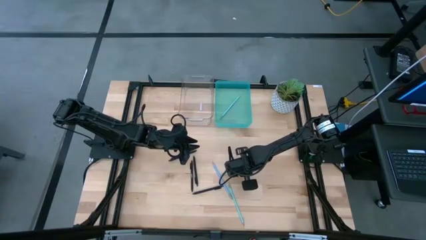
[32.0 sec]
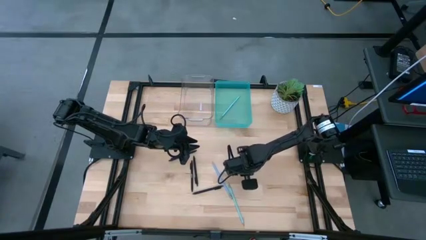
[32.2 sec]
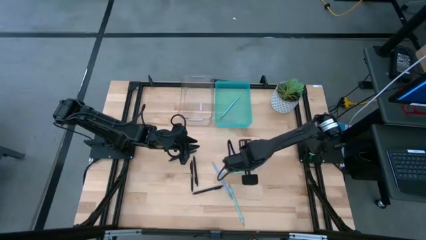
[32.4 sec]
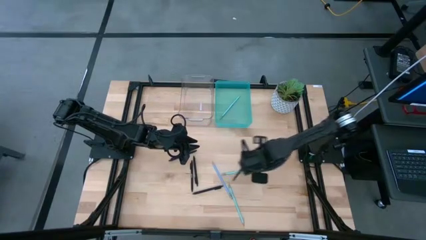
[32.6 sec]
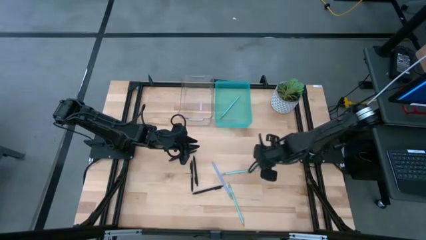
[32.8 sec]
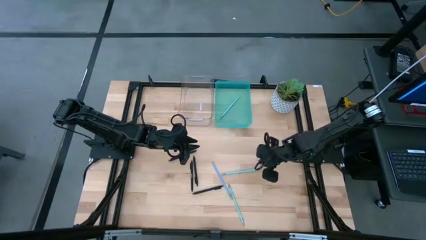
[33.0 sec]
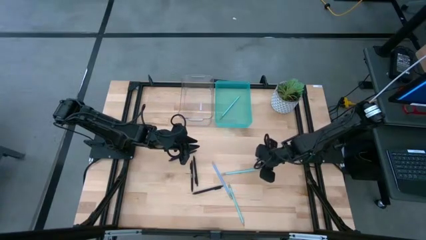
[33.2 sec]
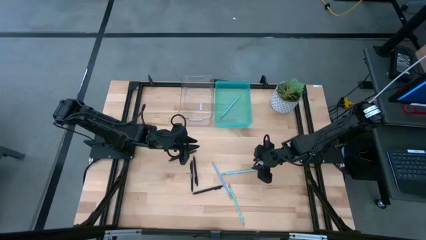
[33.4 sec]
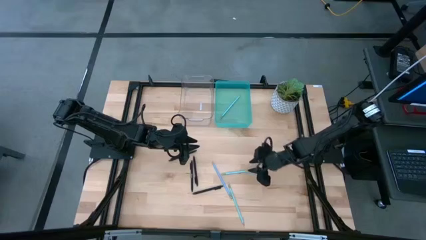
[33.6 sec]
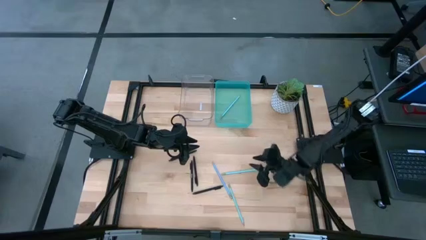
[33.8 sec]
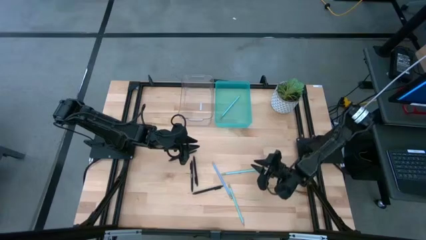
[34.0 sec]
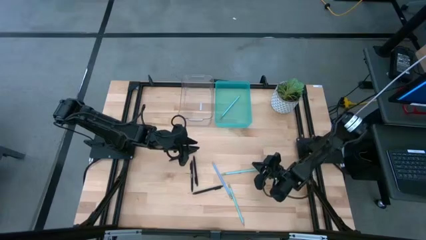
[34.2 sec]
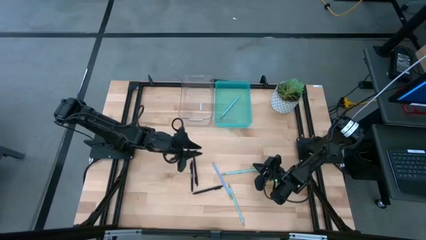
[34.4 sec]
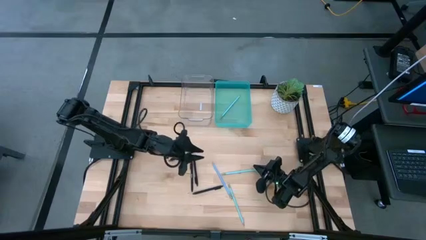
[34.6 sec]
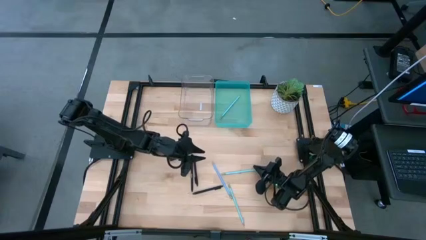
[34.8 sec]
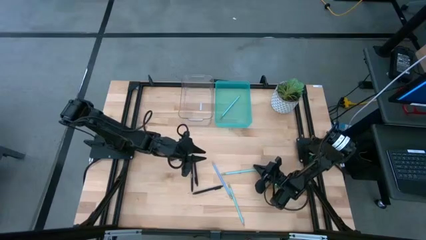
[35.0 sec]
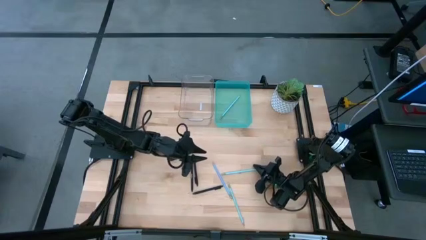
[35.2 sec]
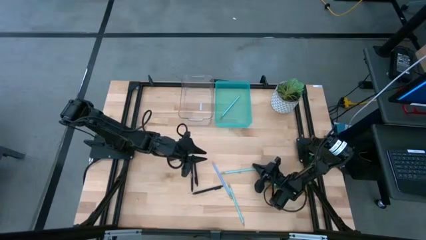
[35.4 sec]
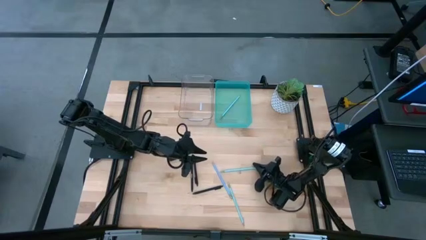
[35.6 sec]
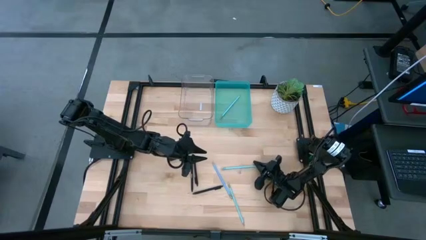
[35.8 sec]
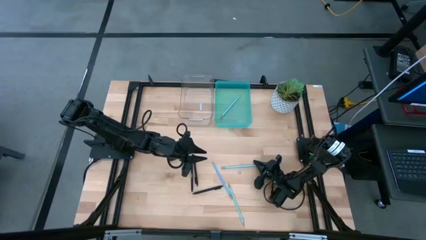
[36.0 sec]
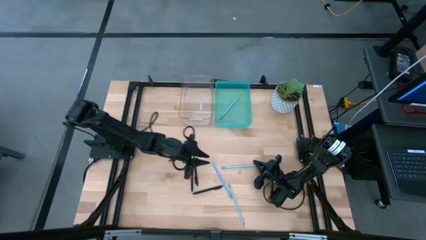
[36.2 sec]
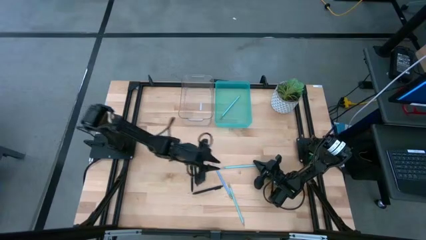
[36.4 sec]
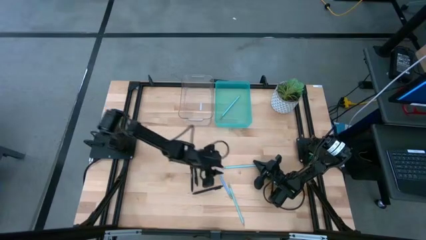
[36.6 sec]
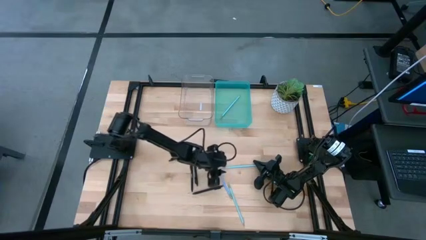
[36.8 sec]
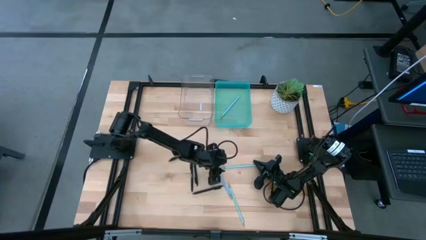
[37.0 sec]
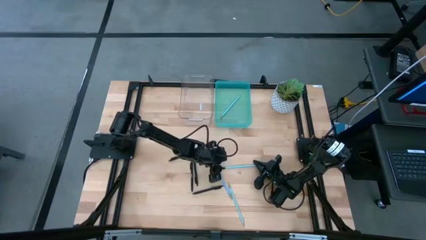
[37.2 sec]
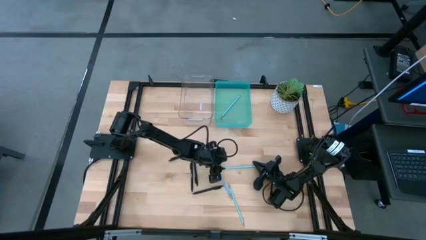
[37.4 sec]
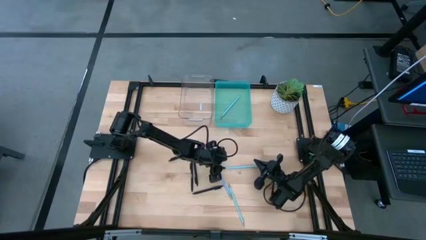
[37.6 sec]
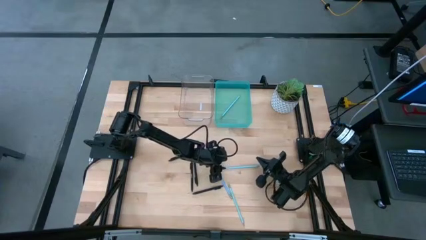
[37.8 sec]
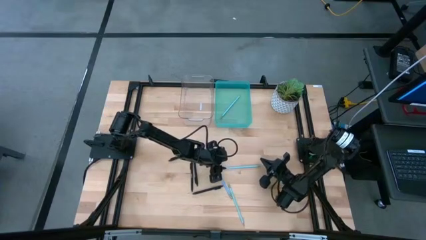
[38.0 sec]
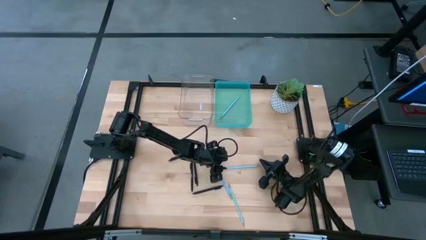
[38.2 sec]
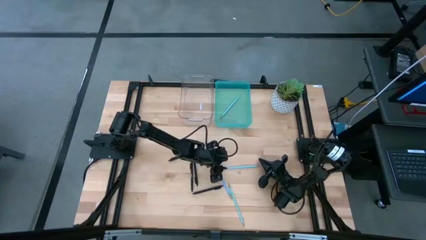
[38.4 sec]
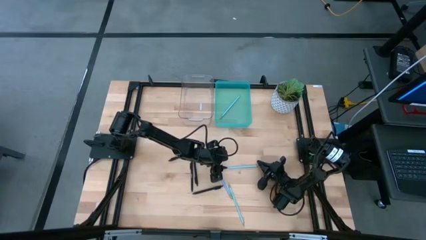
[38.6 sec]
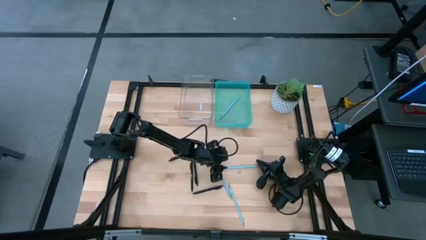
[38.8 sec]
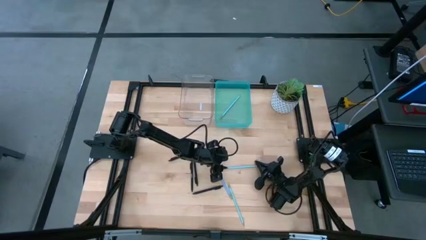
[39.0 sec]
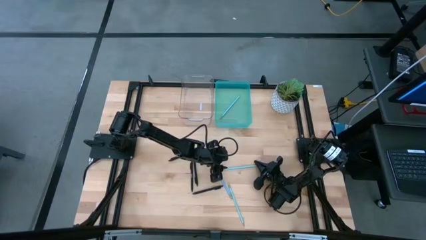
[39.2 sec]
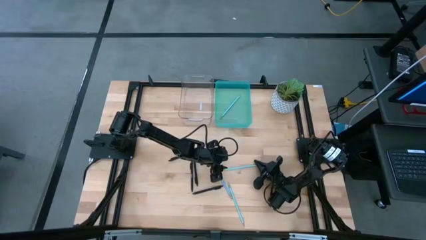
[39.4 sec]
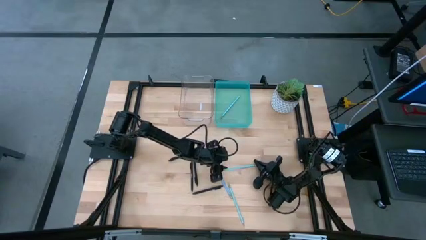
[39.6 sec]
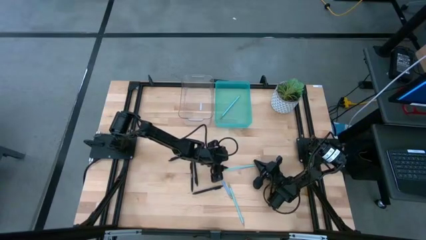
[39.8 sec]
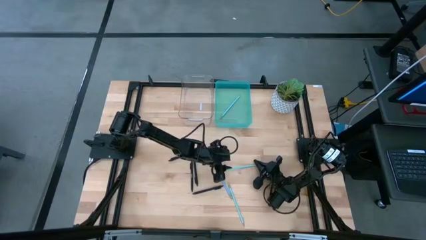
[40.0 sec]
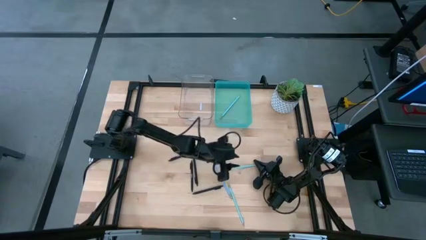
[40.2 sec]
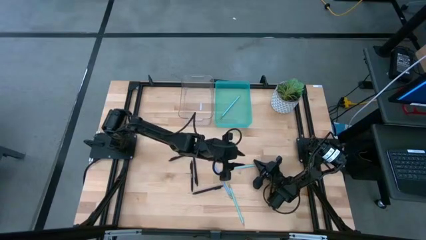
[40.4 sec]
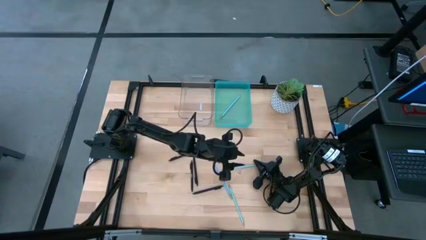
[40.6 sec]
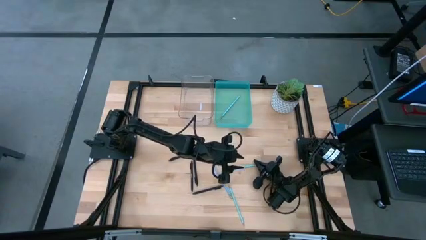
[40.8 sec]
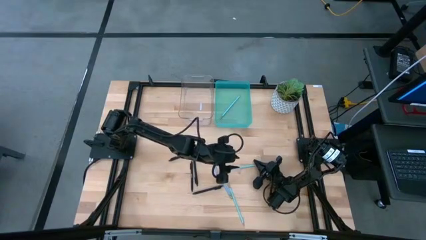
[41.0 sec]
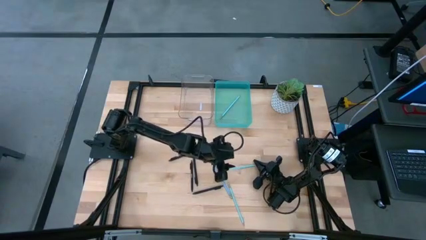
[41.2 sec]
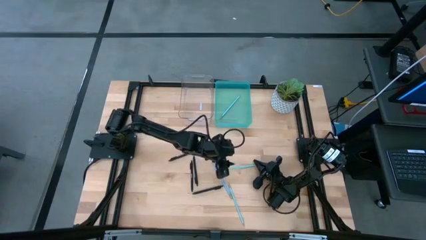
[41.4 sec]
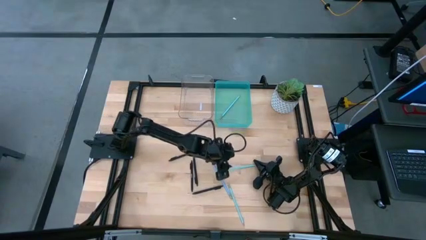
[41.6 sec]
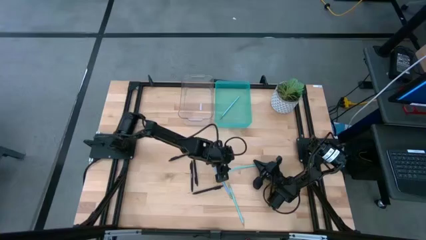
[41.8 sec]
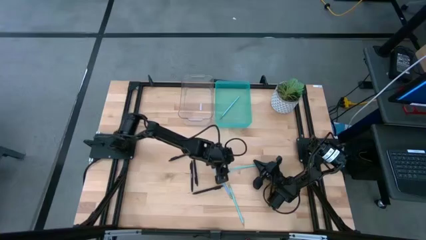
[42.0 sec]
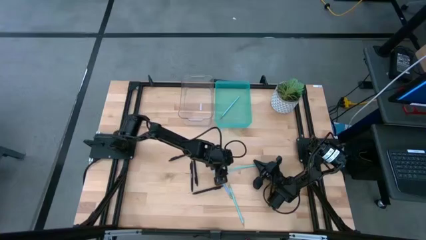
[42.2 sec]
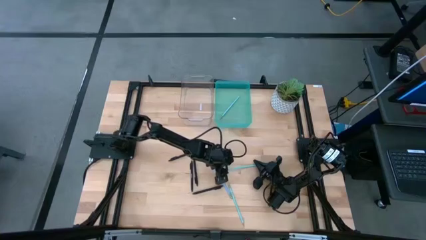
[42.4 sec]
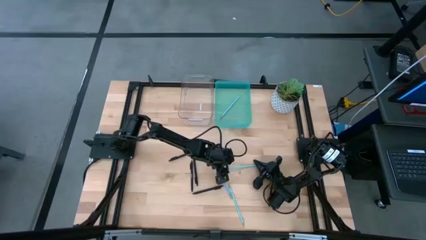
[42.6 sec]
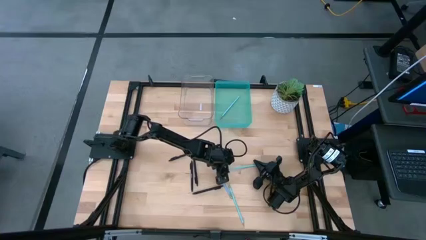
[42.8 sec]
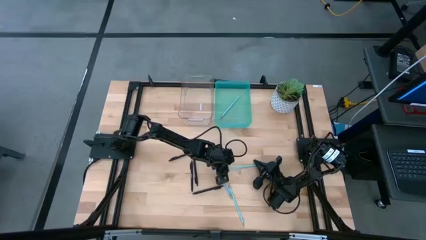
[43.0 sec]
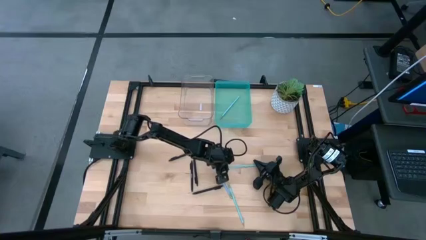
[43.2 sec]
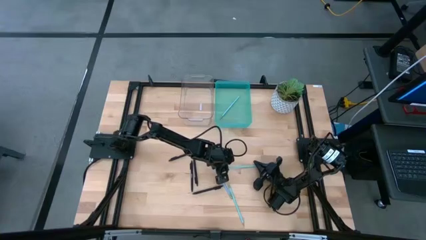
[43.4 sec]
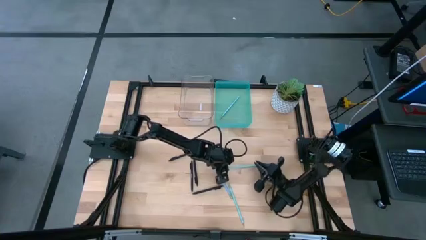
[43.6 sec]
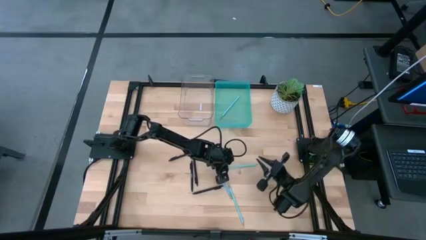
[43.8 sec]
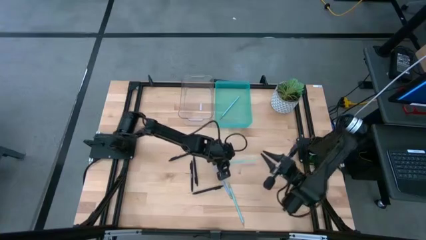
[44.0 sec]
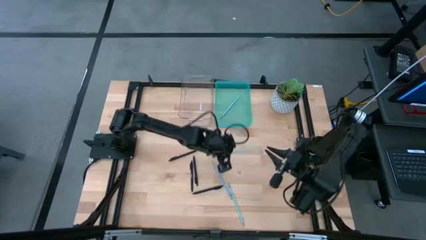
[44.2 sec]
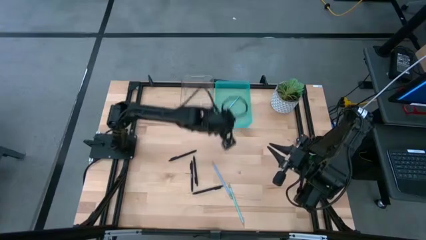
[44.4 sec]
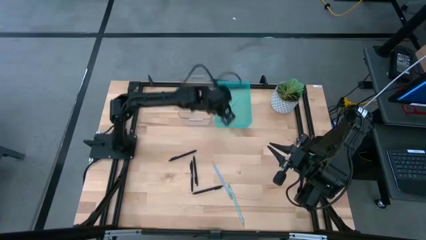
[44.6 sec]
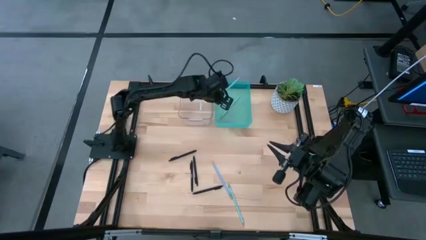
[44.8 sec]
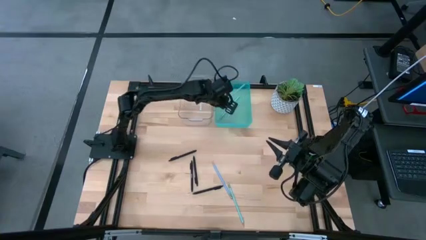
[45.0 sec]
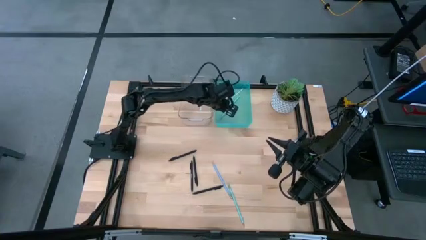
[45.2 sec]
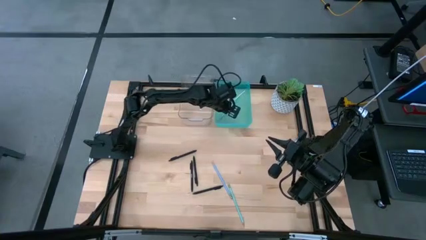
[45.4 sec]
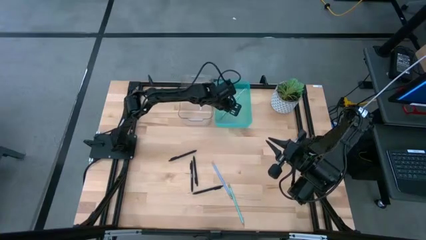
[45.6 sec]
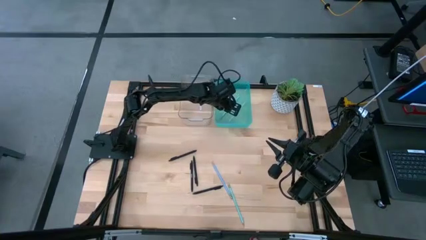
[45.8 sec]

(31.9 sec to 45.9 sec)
Task: Sort pens & pencils
Put the light blue pencil into the light blue bin
